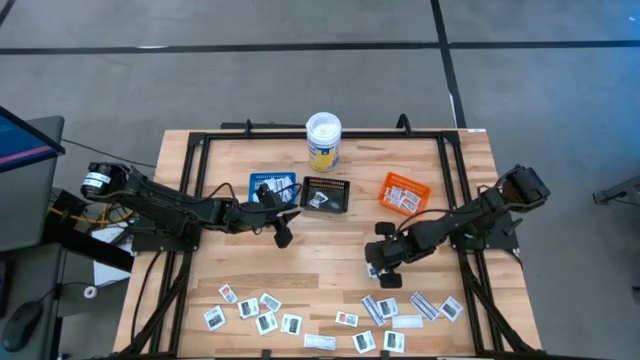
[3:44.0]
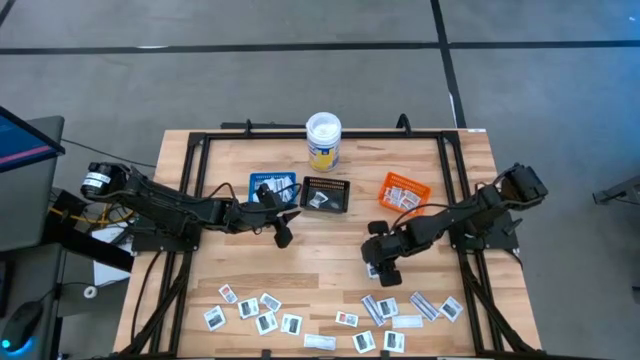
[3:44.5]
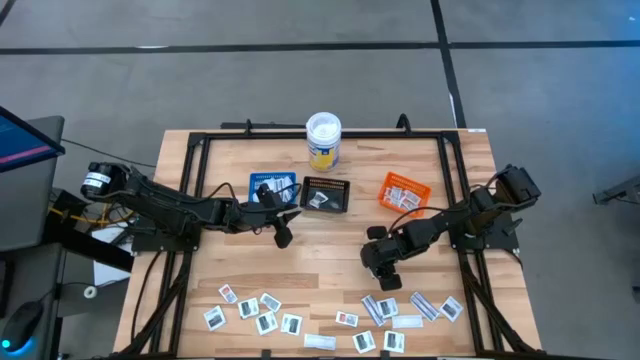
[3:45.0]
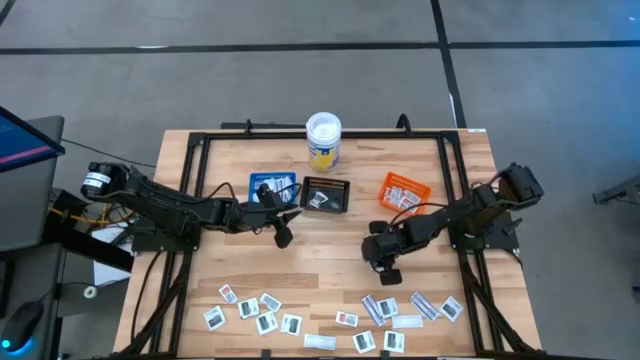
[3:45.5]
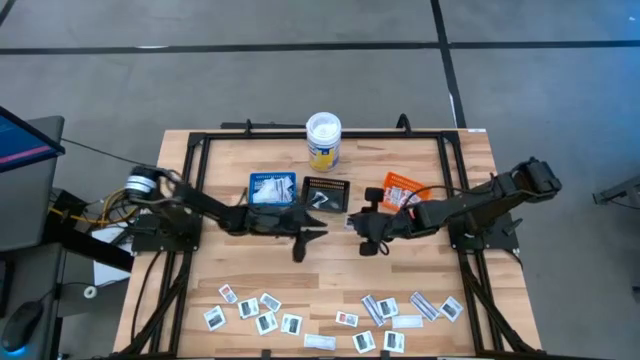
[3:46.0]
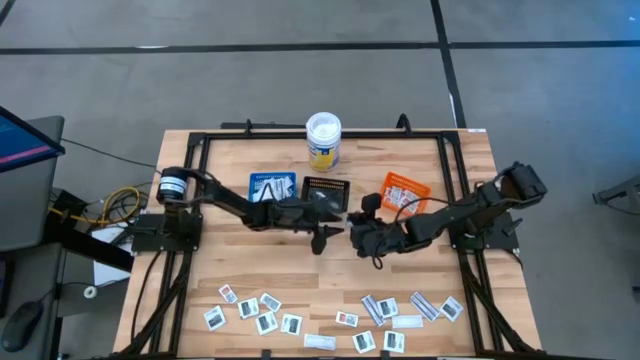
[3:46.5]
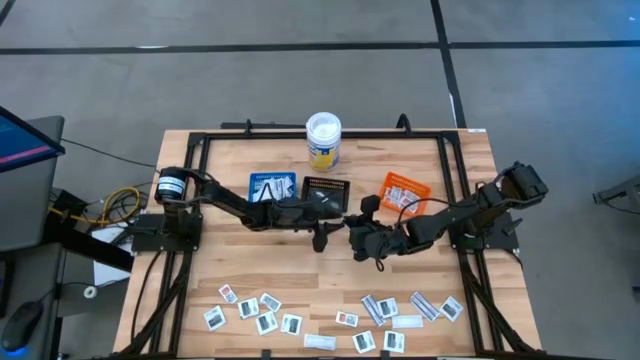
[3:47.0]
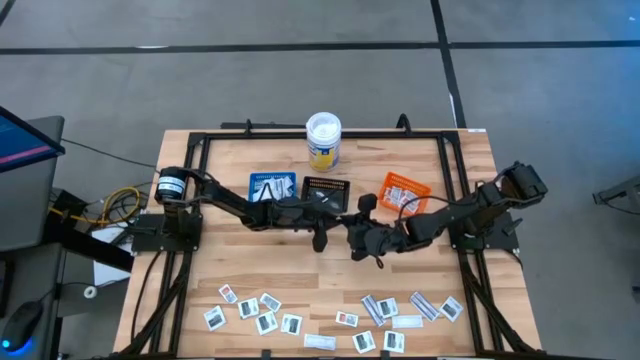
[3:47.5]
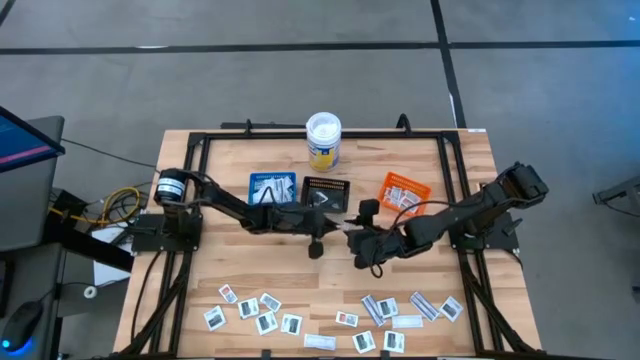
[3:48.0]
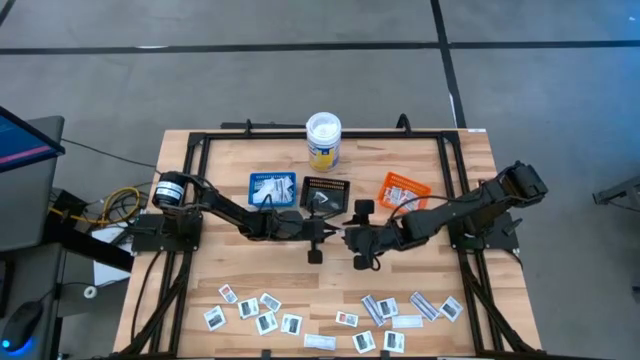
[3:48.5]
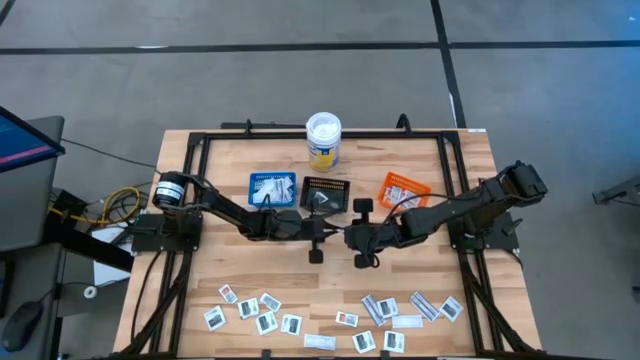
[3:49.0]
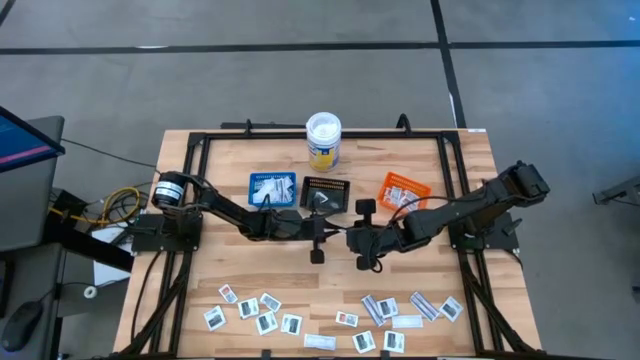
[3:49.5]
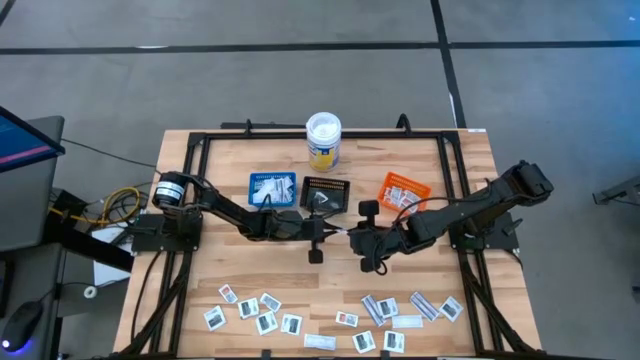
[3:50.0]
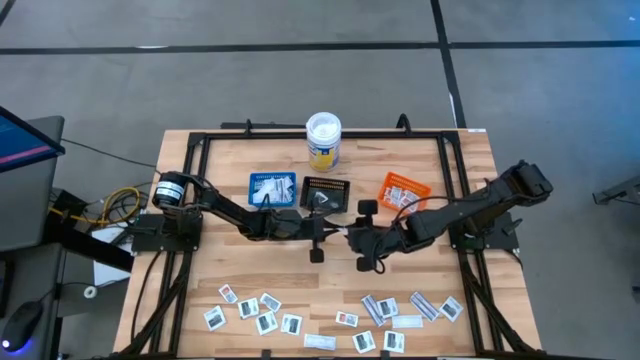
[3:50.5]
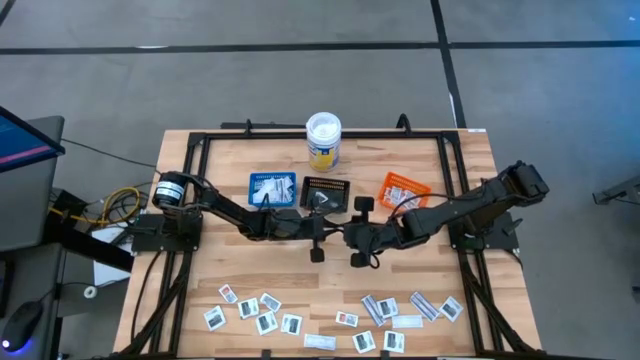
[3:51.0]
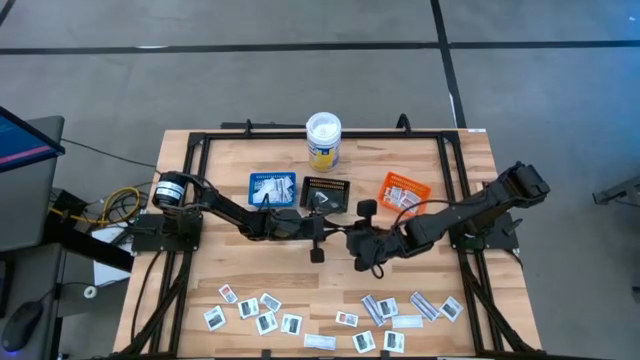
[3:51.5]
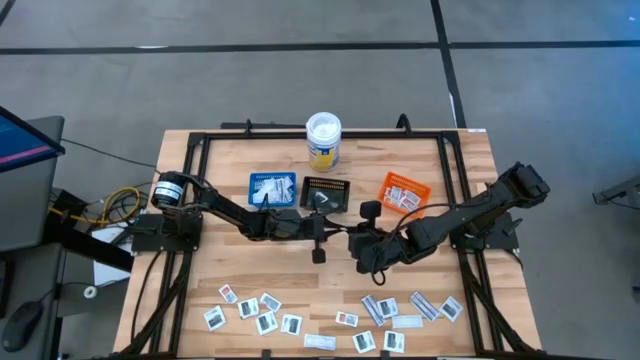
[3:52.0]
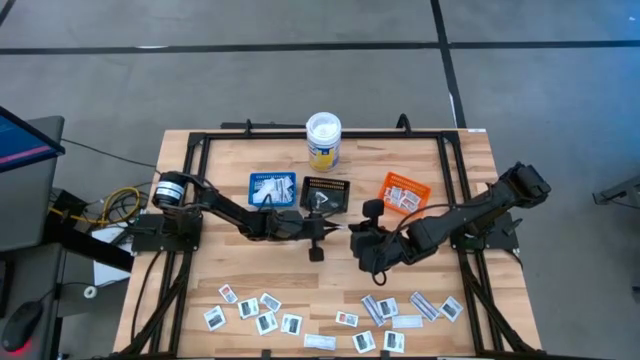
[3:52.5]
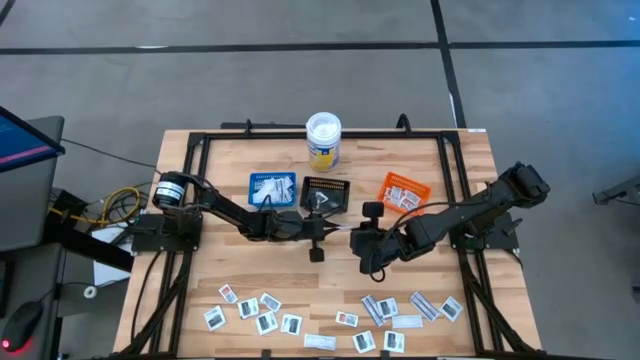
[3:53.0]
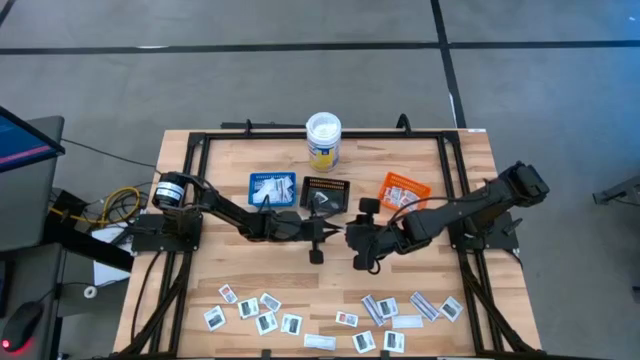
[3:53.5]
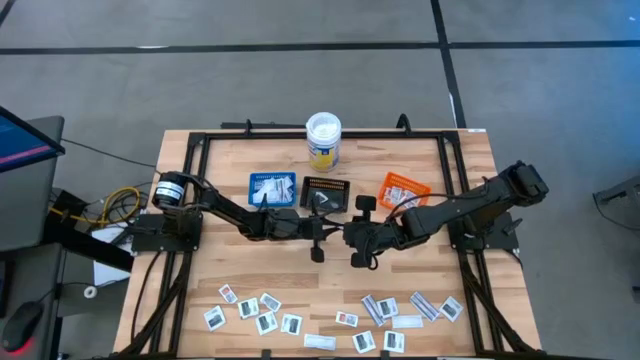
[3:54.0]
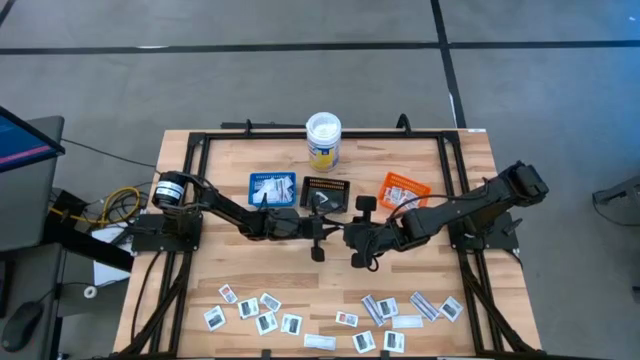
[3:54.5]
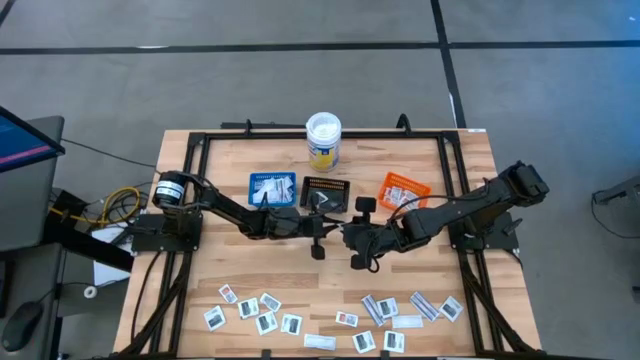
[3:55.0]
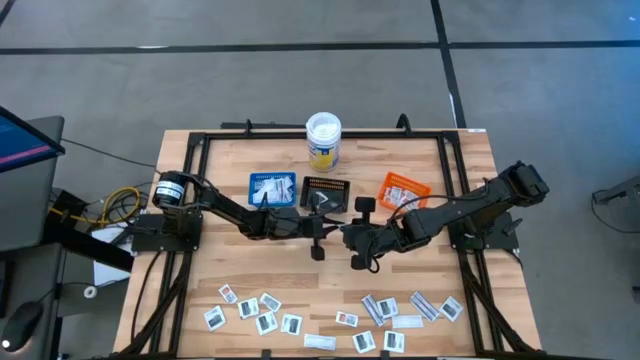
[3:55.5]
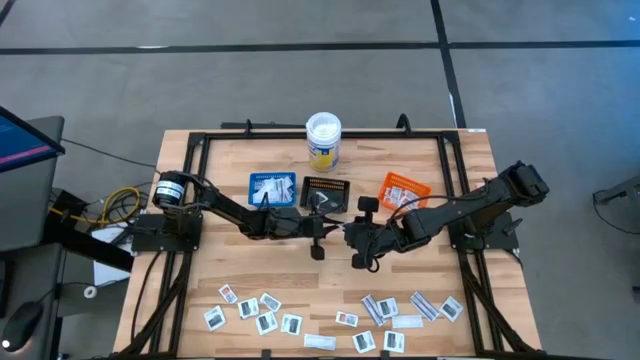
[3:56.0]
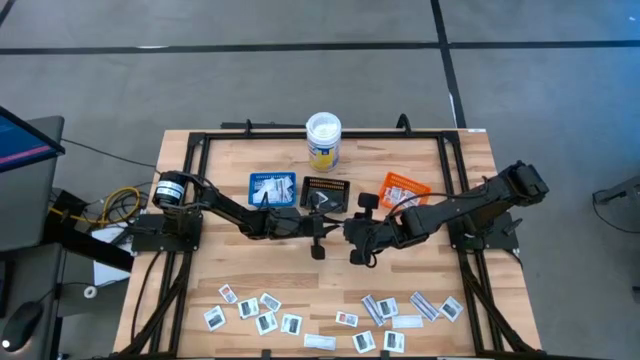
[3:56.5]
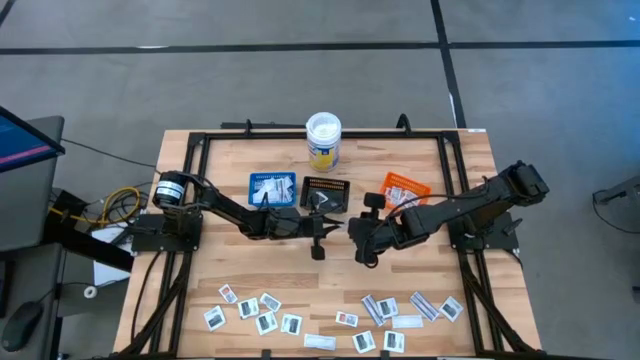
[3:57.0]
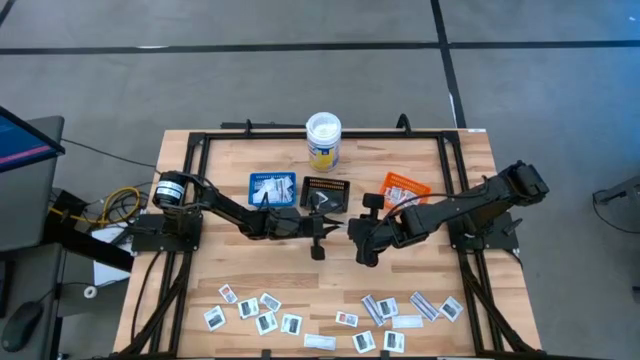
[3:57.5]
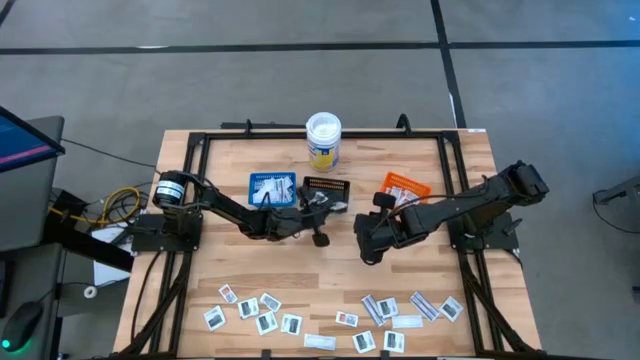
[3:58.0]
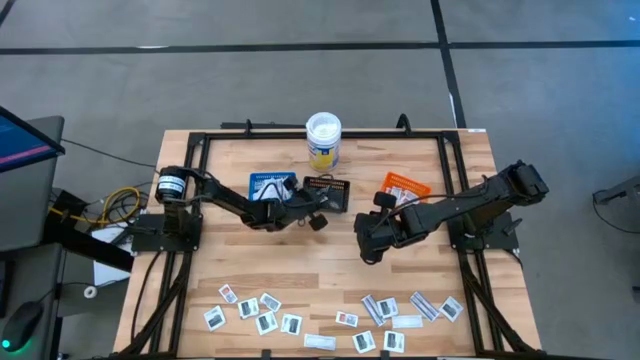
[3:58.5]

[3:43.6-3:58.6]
Task: Pick & Place First Aid Supplies
Put the black towelette pack into the black bin

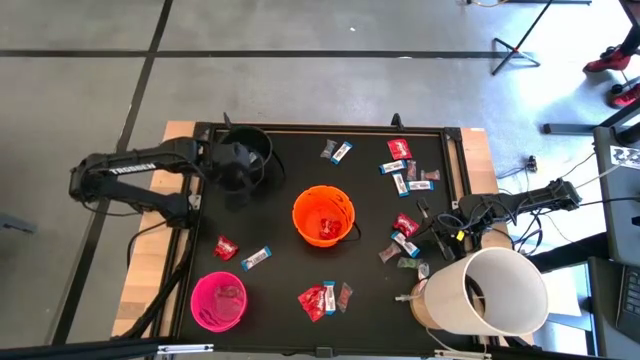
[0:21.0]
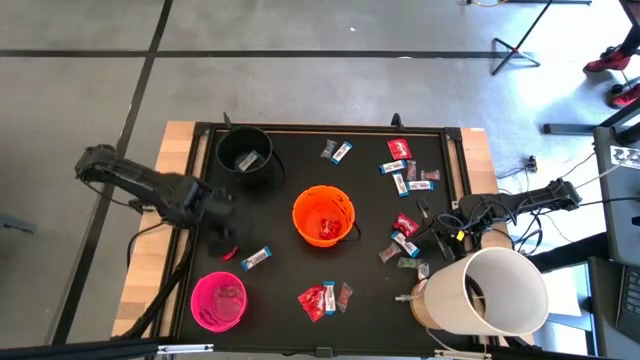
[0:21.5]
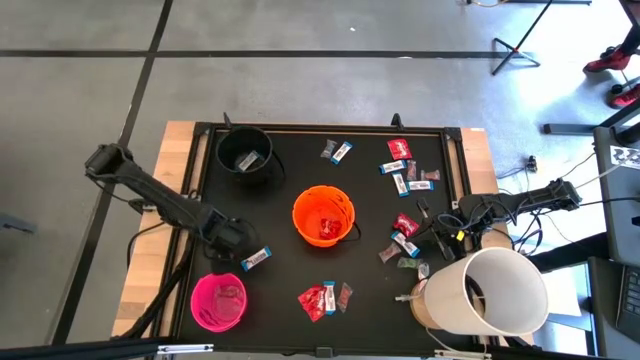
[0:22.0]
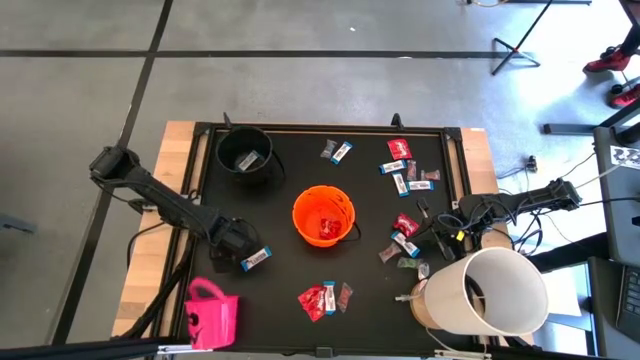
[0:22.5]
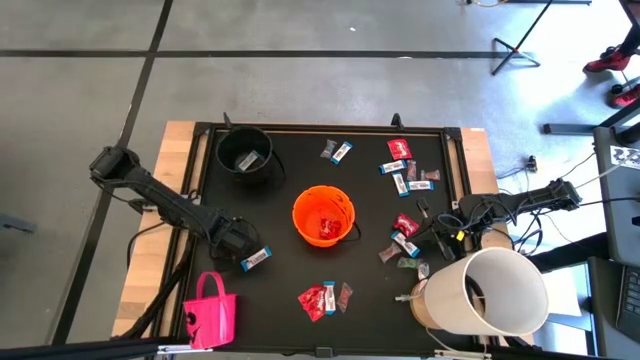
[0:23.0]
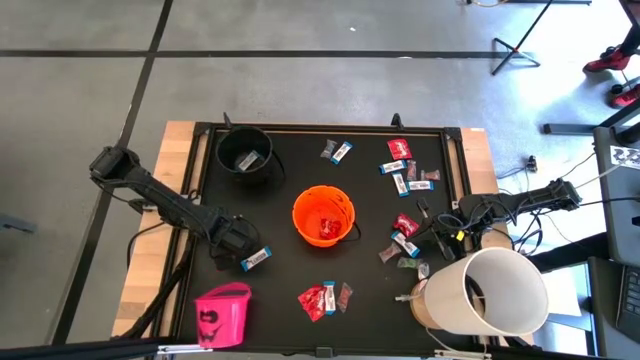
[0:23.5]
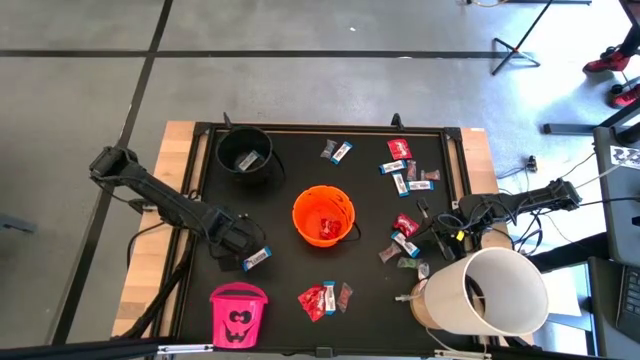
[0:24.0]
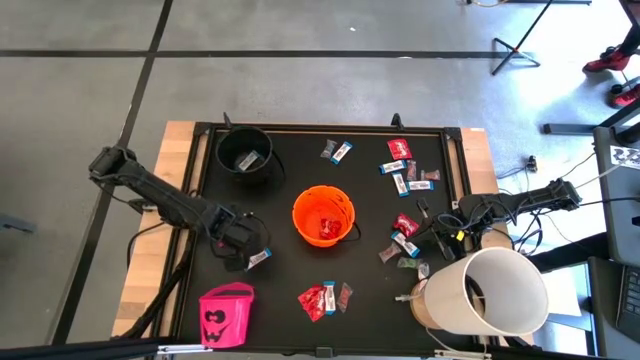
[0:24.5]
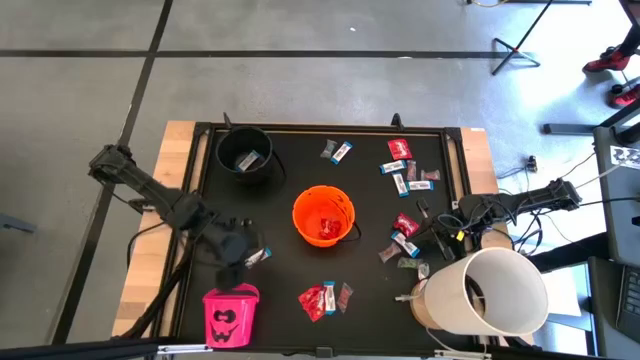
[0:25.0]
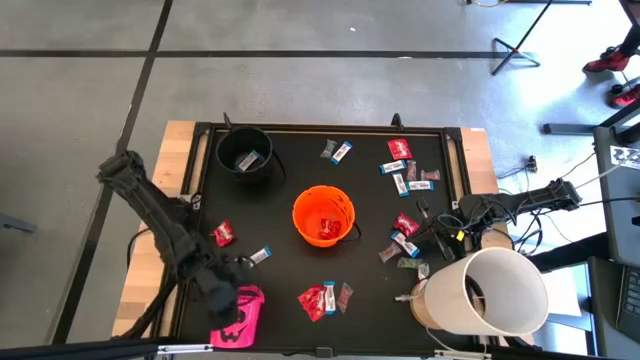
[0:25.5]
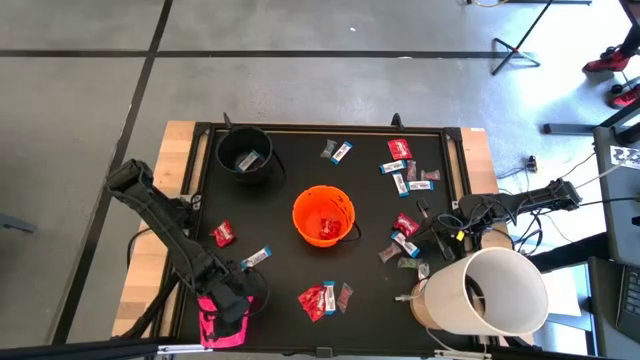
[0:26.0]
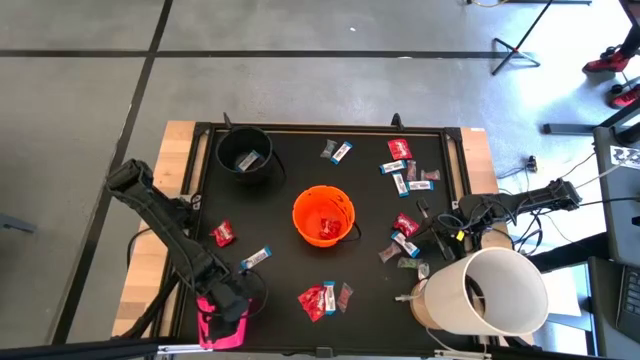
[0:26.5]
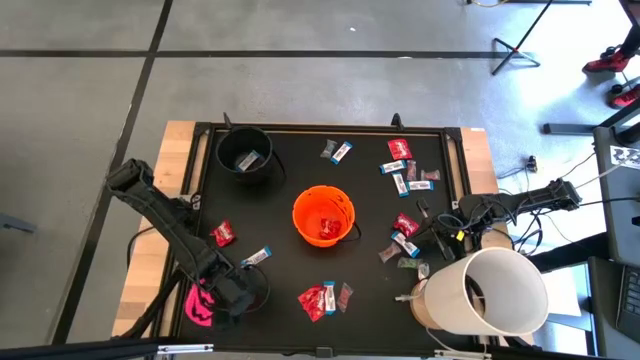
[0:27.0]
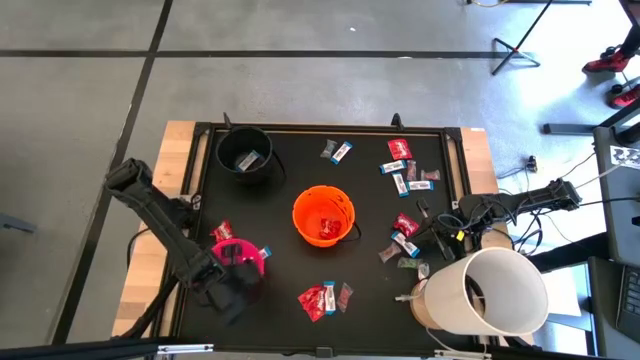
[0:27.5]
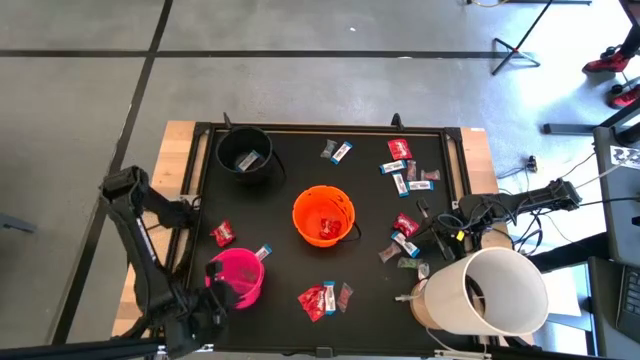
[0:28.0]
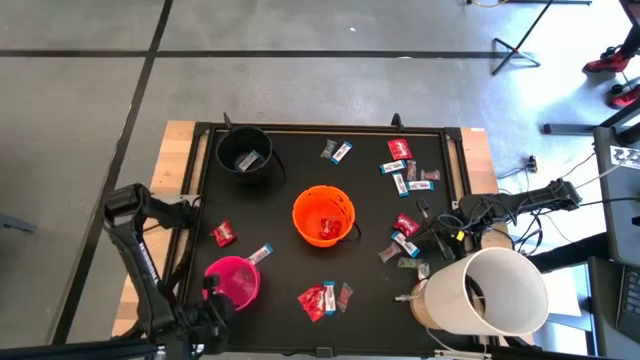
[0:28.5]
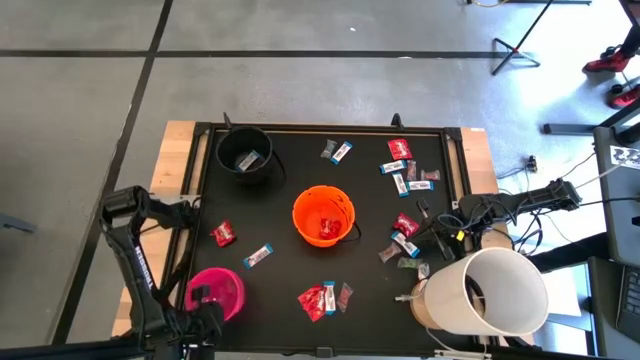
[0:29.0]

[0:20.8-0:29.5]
Task: Sort candy
Adjust the pink bucket
